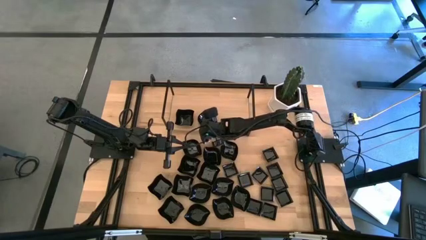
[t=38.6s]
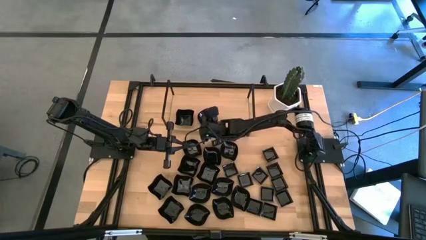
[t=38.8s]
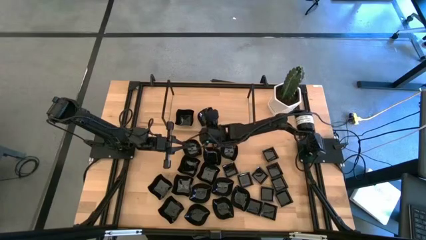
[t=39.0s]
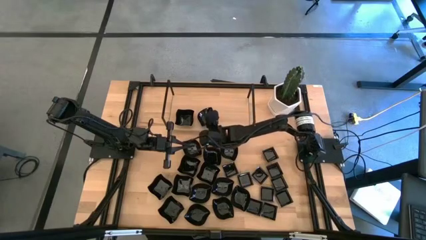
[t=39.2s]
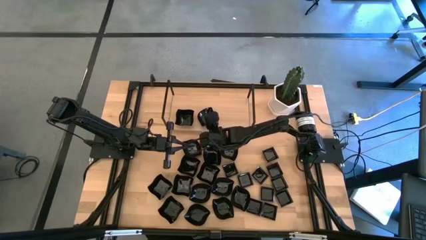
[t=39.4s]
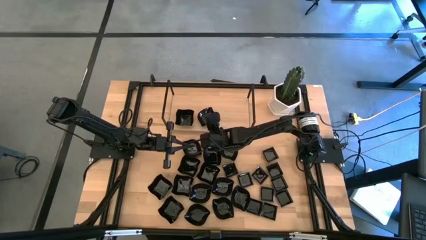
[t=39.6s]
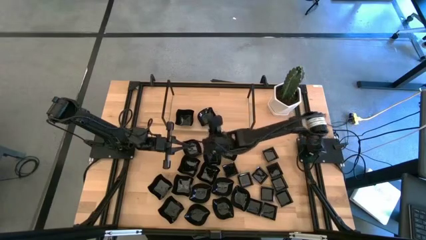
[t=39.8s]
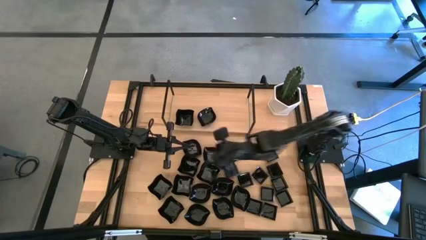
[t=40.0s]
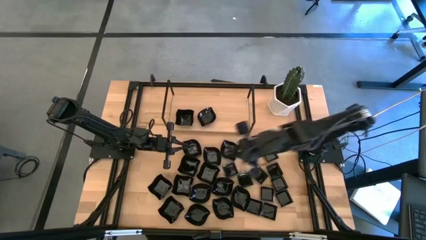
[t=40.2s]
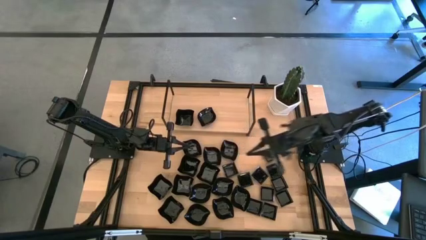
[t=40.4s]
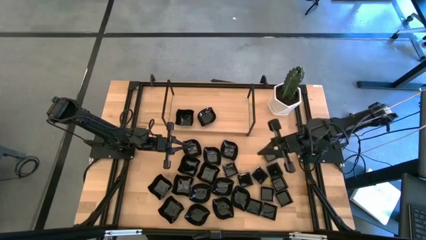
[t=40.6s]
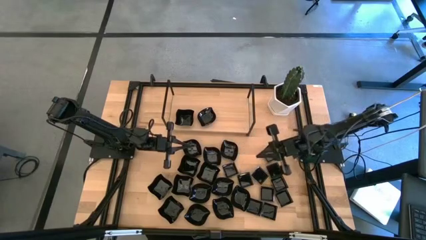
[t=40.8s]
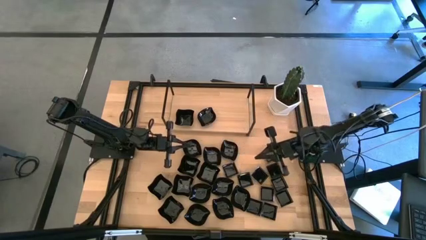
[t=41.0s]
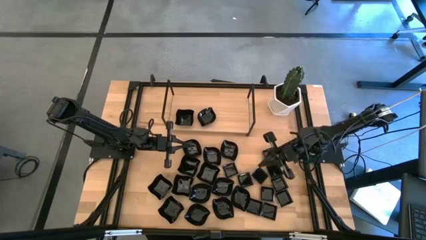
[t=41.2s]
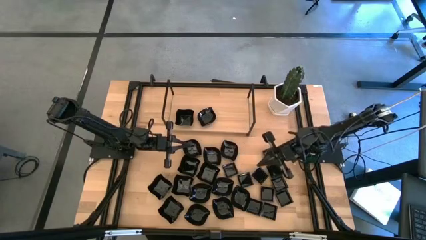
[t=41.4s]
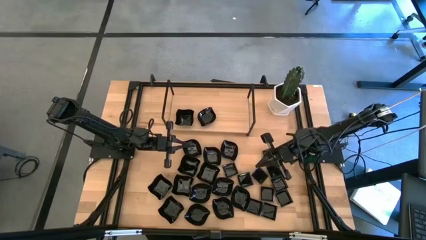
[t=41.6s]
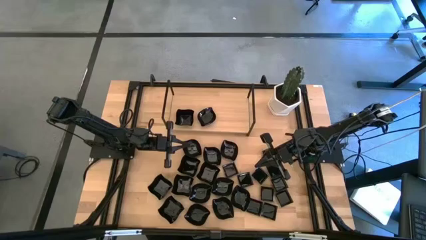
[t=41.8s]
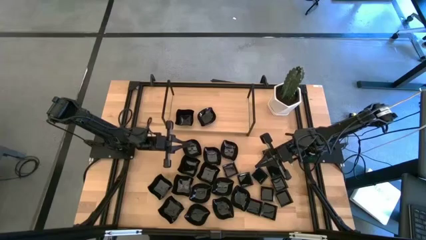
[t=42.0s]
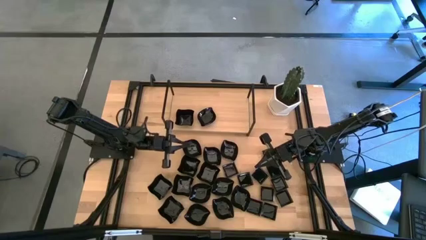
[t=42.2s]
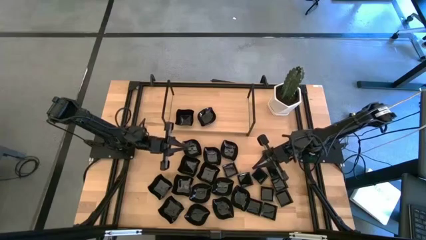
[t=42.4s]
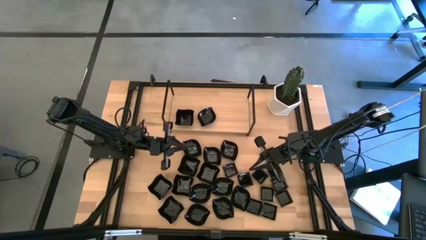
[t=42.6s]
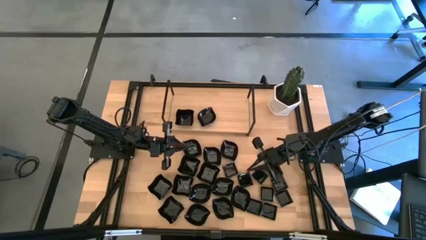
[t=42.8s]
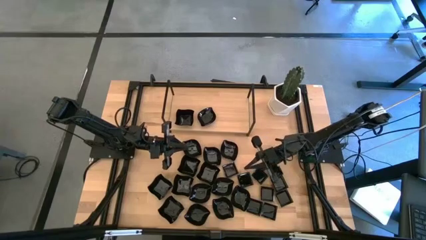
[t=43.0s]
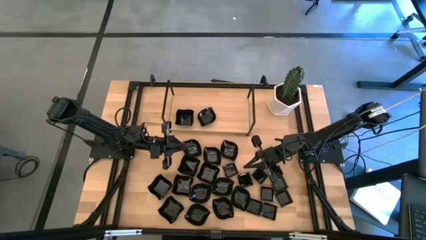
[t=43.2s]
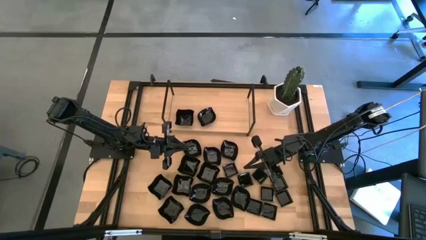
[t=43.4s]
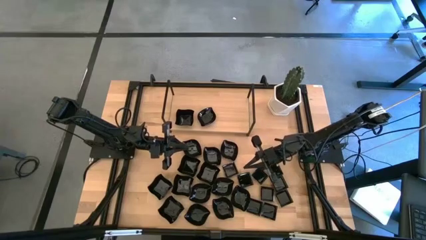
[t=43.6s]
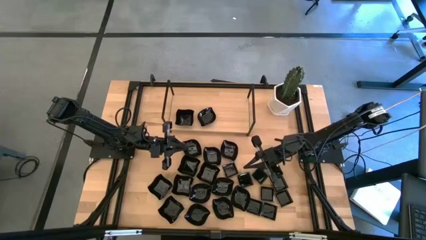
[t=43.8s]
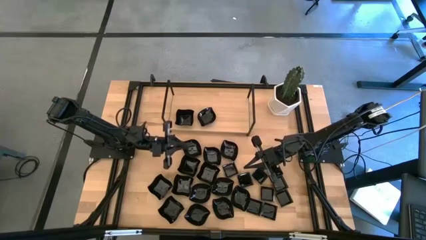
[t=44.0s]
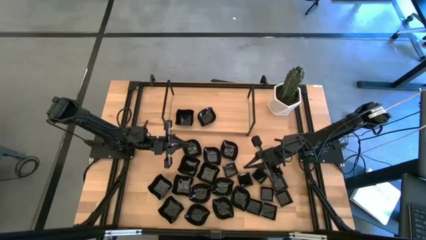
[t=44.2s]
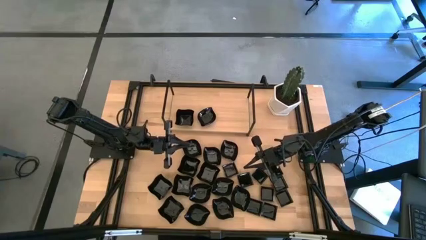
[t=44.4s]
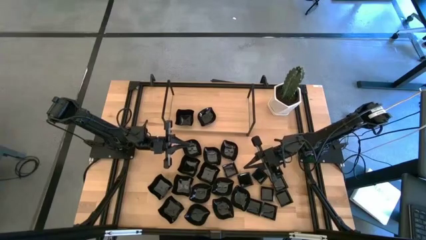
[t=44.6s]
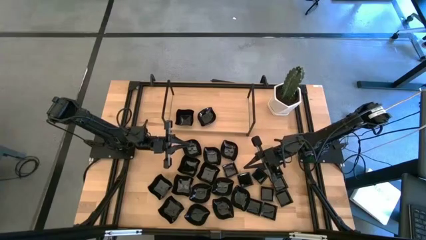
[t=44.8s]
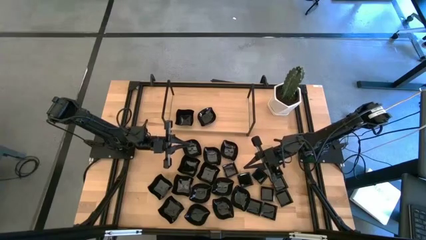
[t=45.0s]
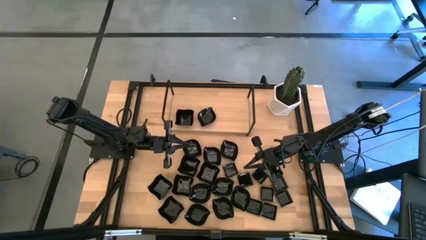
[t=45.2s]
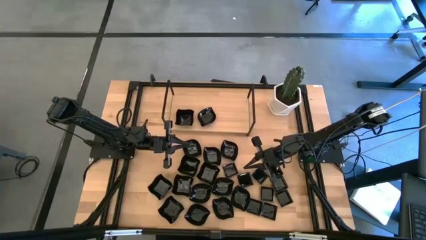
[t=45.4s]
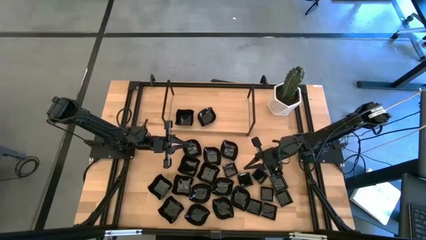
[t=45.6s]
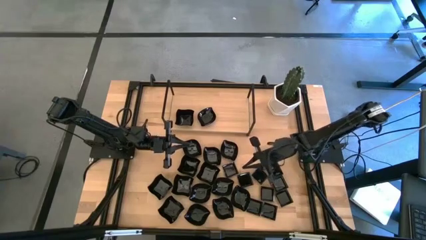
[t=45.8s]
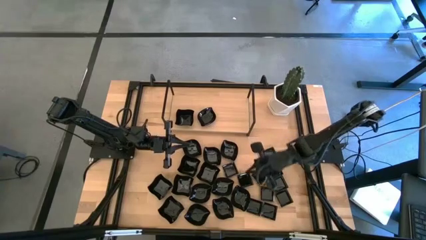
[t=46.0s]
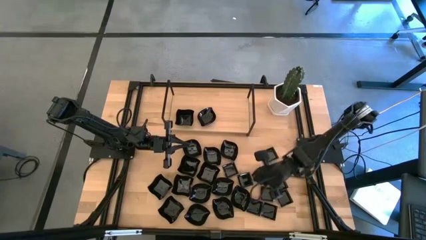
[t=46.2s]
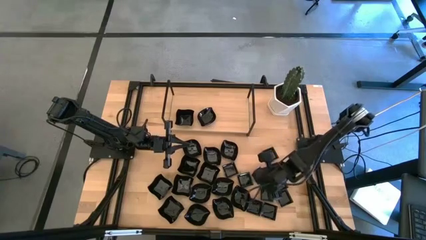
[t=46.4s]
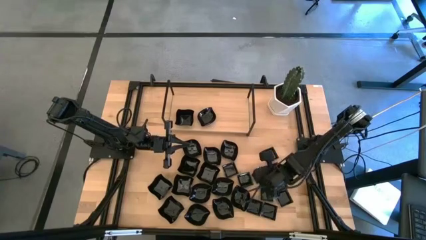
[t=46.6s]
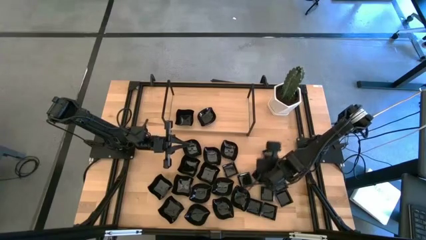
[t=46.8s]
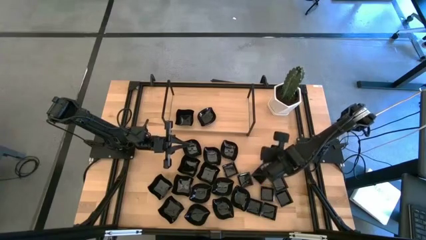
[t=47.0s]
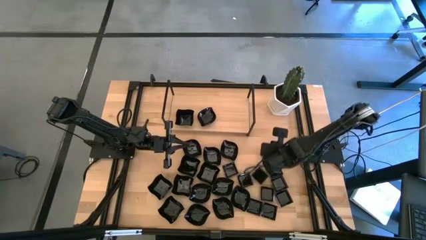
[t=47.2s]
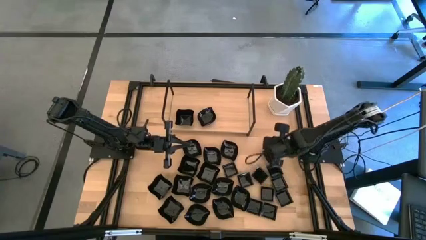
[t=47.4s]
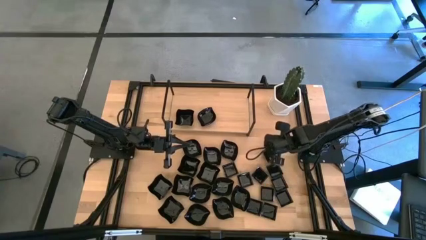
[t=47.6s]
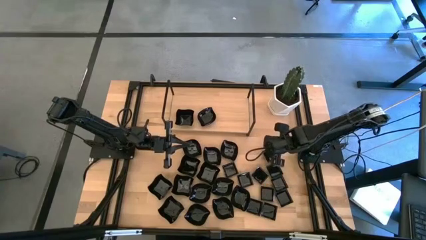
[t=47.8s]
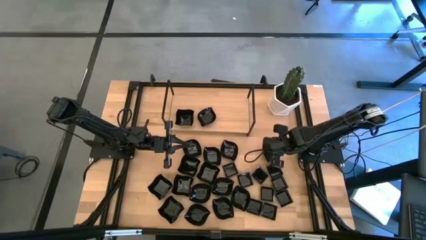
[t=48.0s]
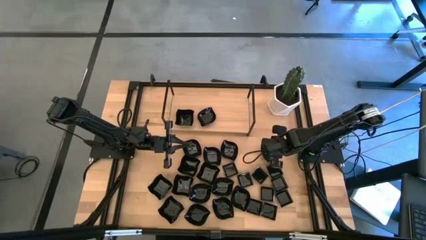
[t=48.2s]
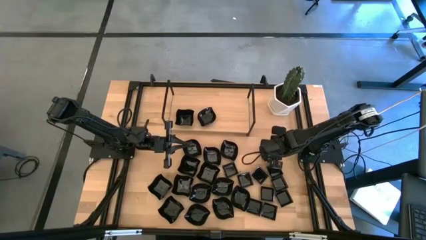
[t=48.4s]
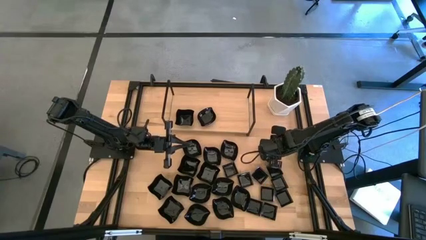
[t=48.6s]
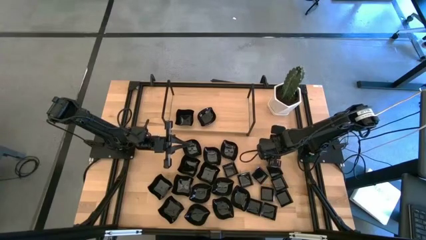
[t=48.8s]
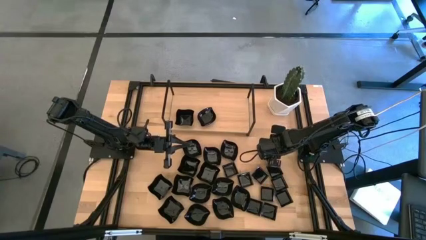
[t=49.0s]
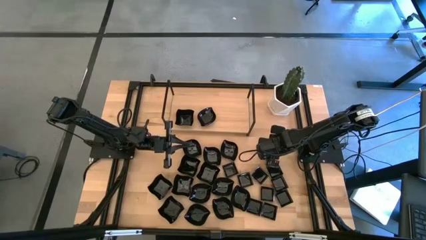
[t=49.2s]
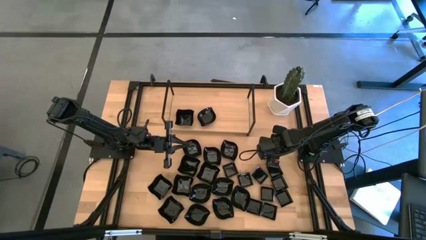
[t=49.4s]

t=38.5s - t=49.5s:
Task: Pick & Place Mini shaped plates
Put the square plate on the shelf

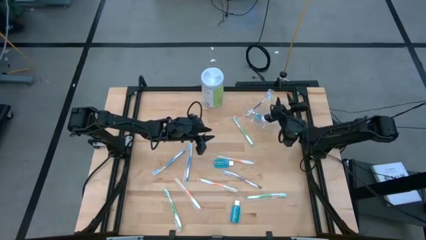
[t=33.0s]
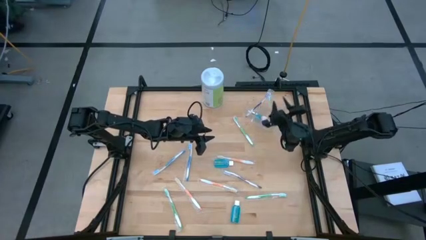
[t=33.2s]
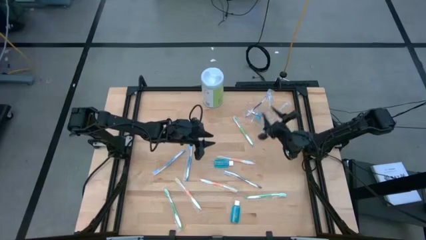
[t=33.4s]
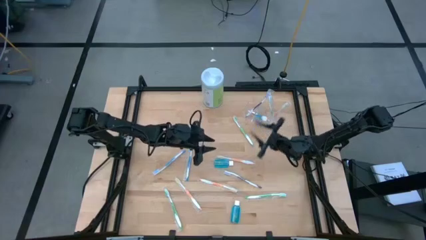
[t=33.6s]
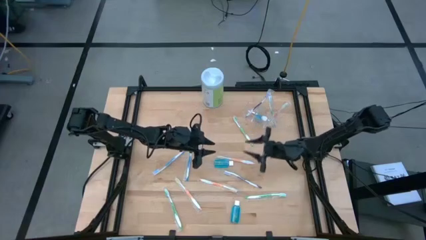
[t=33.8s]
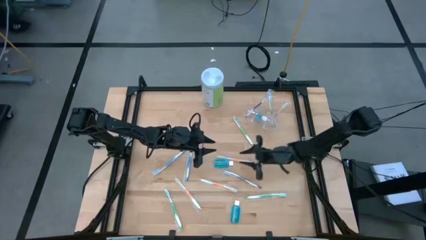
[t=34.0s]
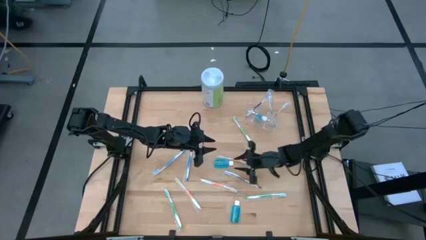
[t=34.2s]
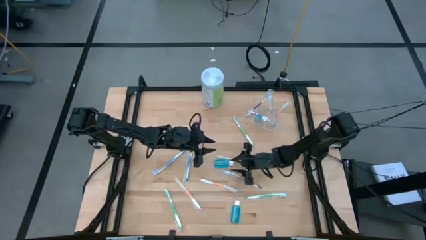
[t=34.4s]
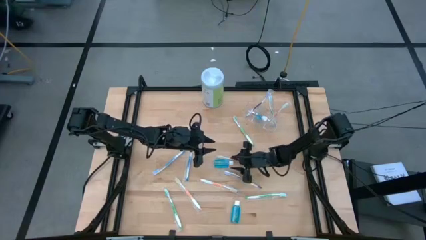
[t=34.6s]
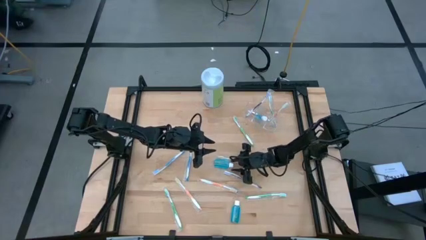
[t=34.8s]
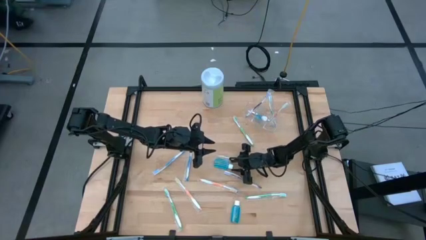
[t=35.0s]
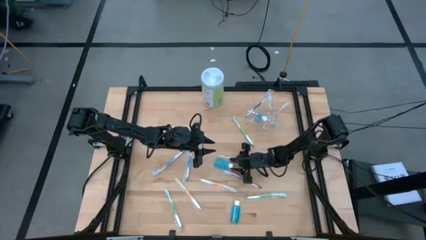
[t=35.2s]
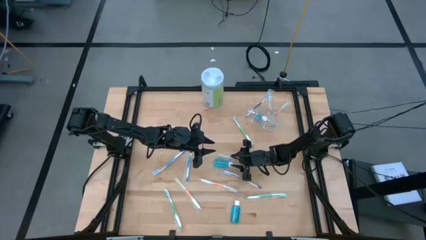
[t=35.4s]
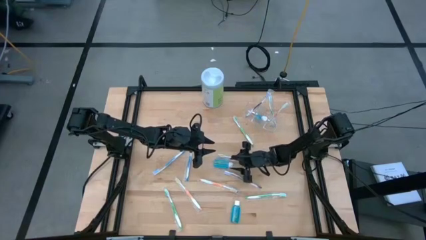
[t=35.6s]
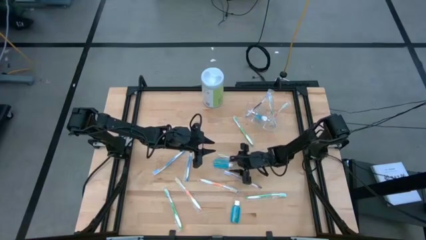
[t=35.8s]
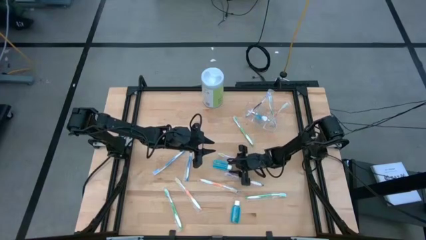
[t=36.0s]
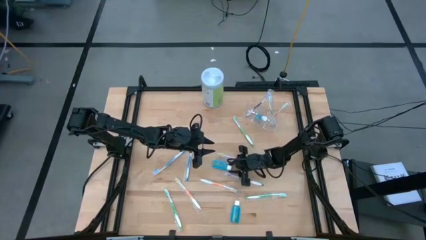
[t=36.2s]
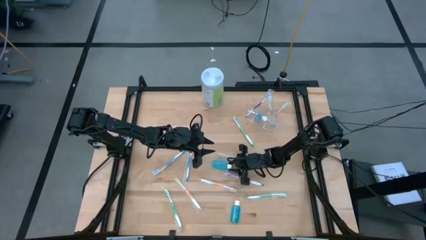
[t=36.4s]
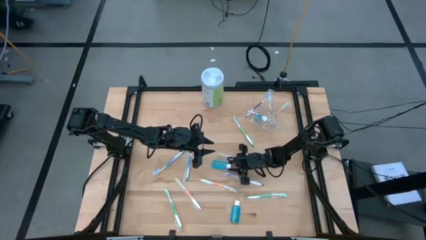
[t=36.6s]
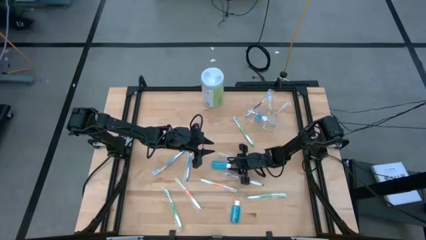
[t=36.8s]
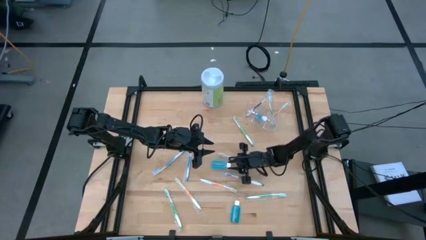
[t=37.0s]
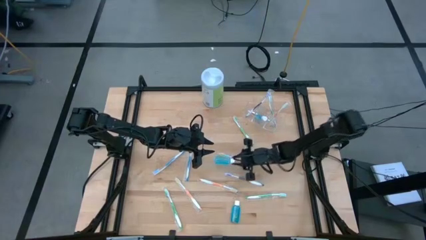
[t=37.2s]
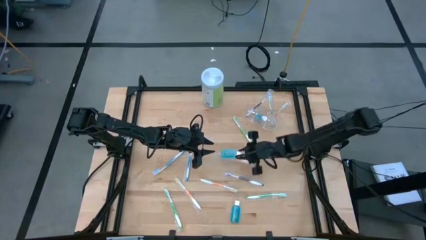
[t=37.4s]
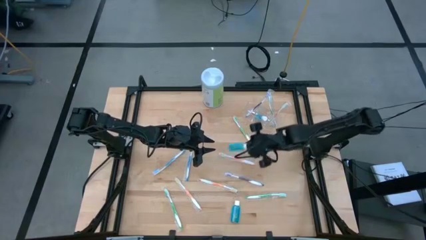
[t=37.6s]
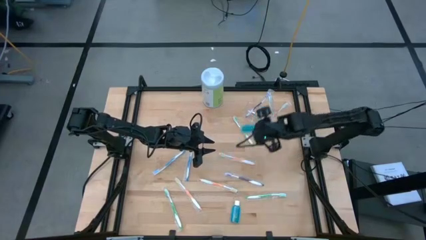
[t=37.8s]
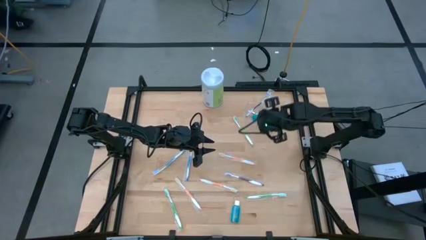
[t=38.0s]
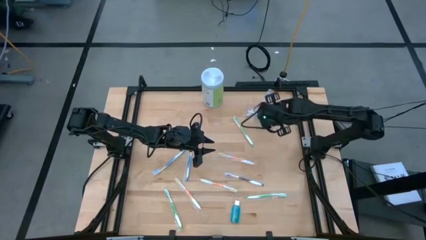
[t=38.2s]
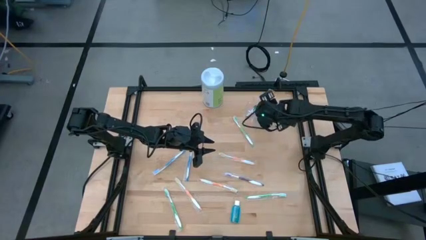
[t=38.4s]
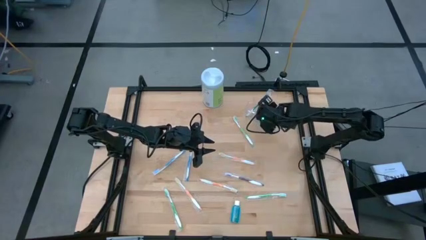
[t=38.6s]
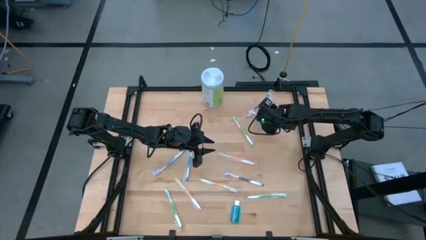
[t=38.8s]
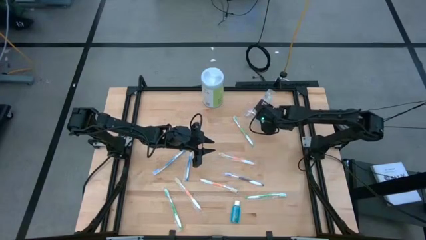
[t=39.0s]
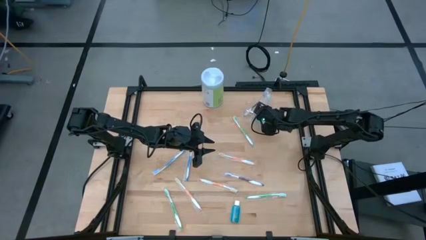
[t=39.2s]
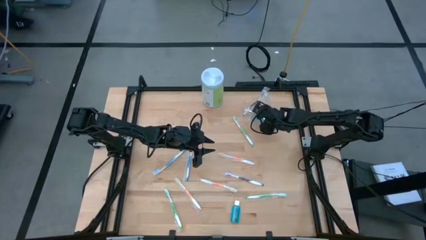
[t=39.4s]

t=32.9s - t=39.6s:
Task: Pick & Place toothbrushing station
Put the blue mouthwash into the transparent organizer
